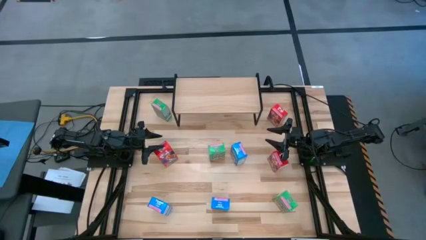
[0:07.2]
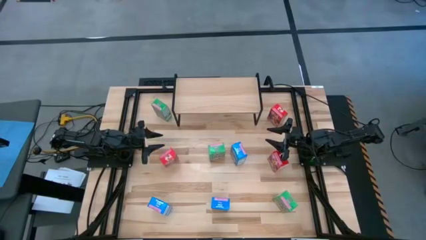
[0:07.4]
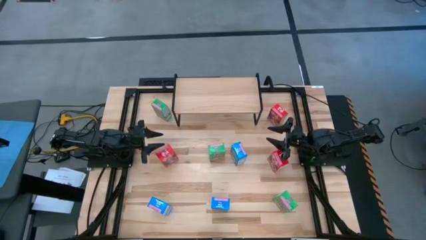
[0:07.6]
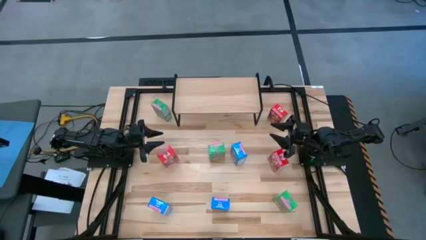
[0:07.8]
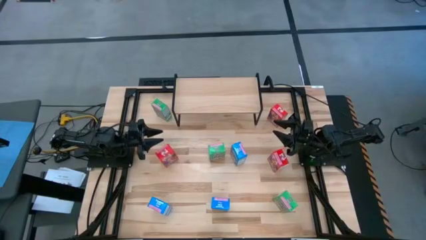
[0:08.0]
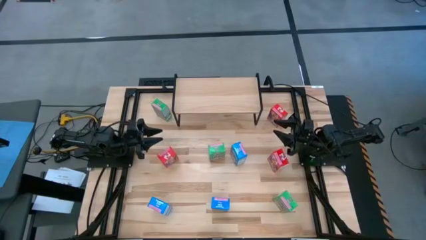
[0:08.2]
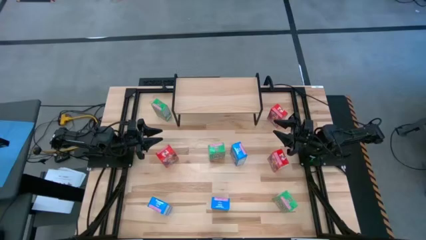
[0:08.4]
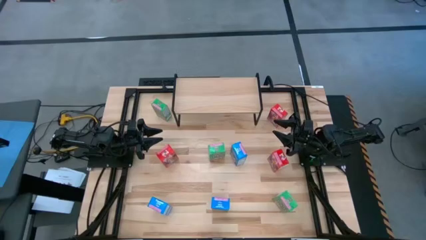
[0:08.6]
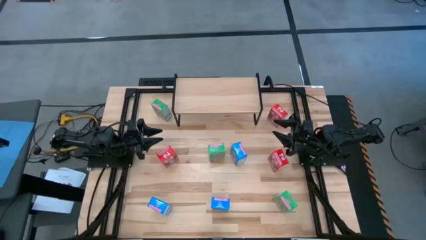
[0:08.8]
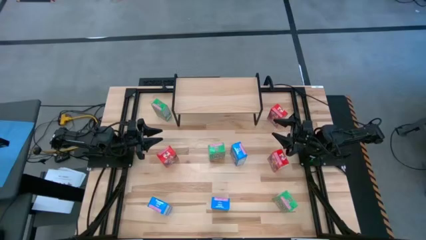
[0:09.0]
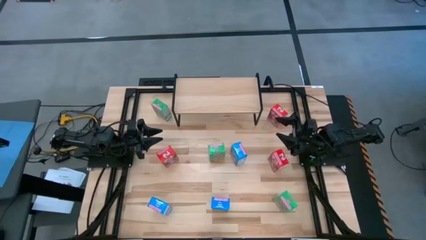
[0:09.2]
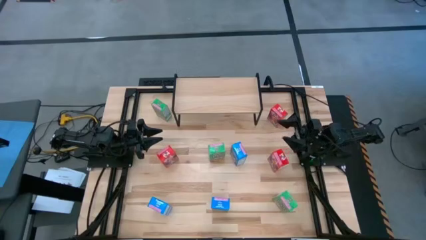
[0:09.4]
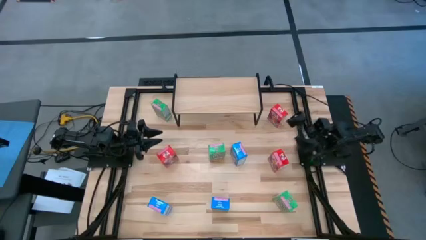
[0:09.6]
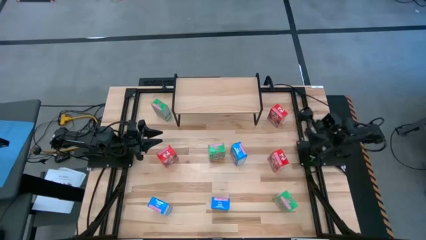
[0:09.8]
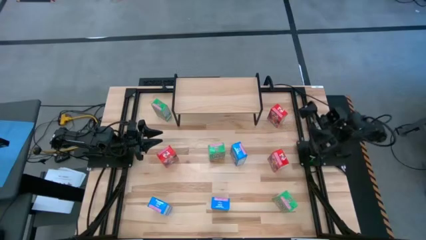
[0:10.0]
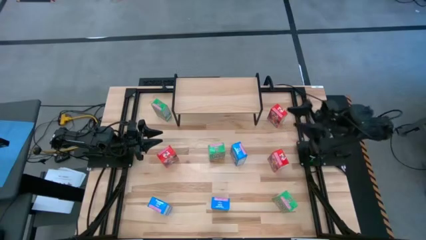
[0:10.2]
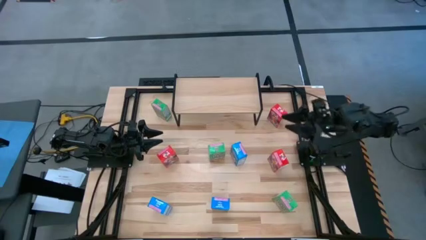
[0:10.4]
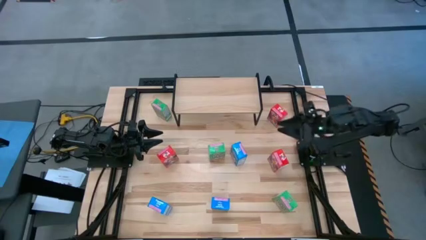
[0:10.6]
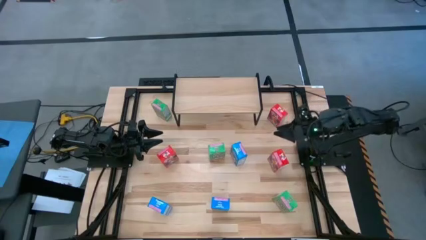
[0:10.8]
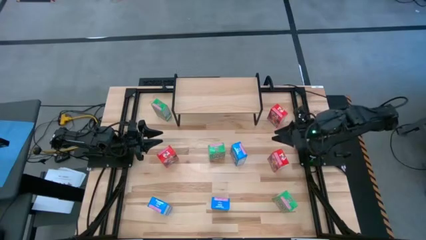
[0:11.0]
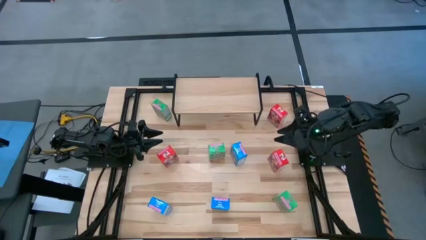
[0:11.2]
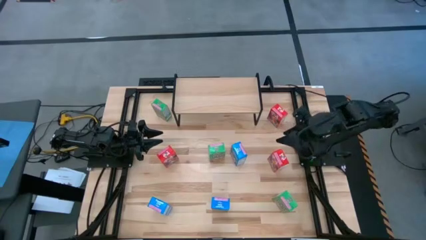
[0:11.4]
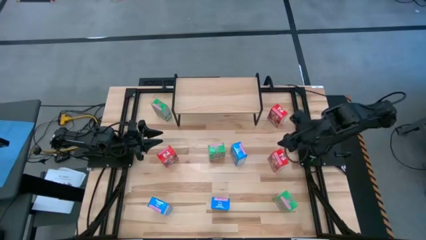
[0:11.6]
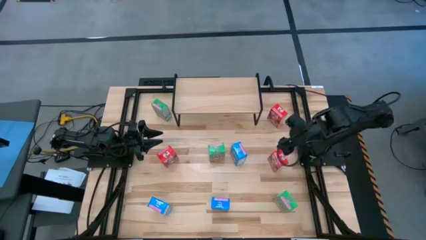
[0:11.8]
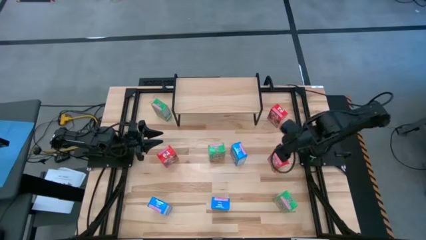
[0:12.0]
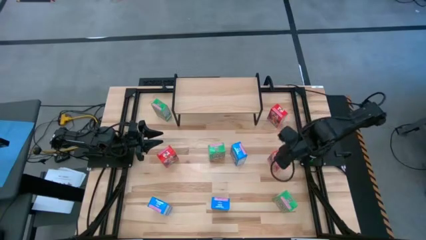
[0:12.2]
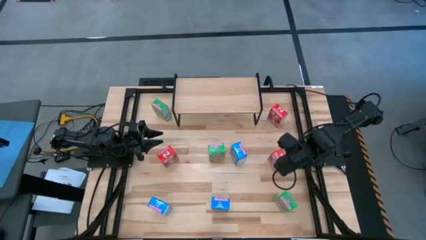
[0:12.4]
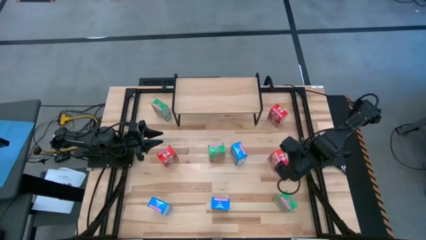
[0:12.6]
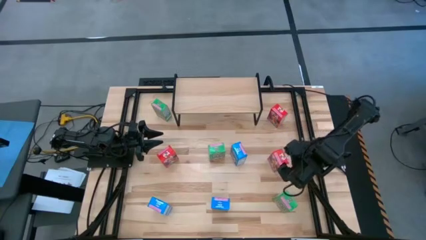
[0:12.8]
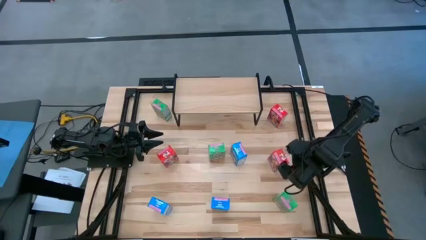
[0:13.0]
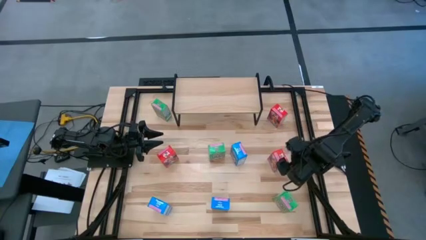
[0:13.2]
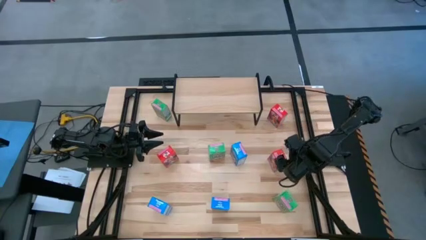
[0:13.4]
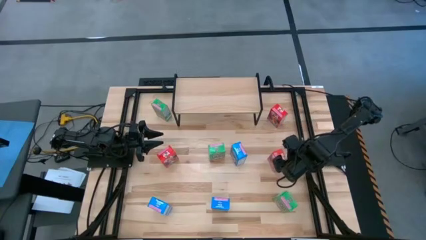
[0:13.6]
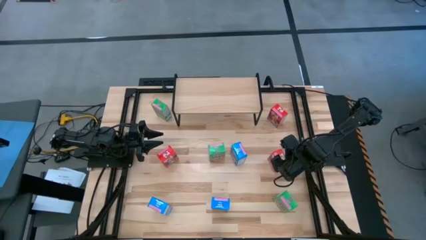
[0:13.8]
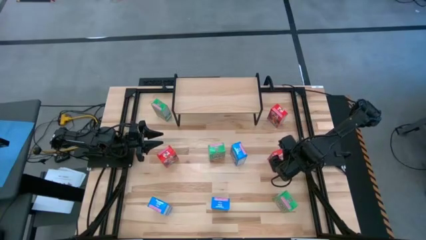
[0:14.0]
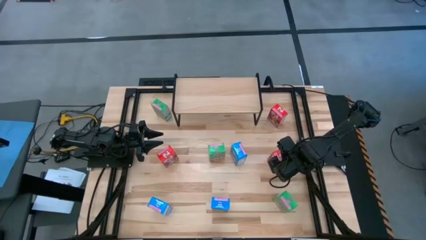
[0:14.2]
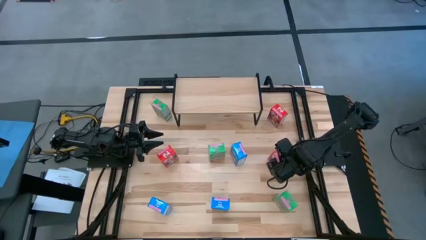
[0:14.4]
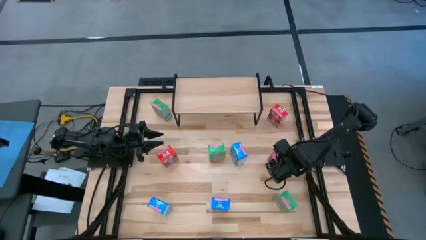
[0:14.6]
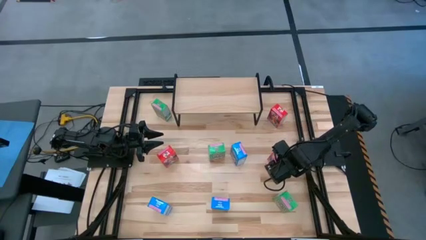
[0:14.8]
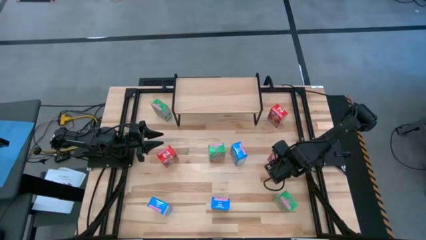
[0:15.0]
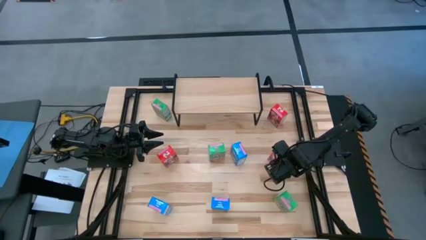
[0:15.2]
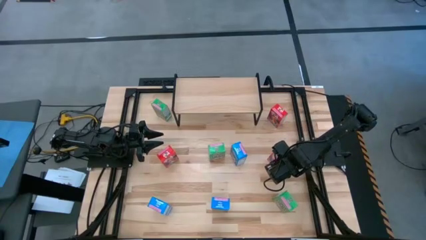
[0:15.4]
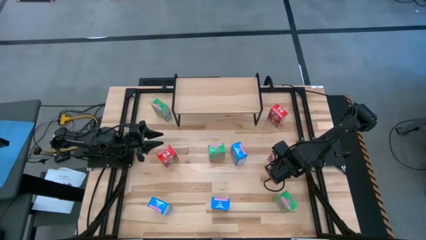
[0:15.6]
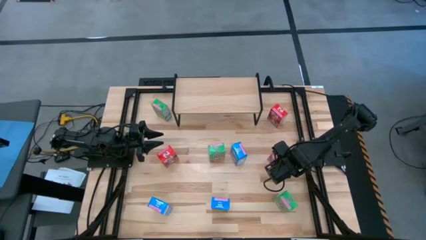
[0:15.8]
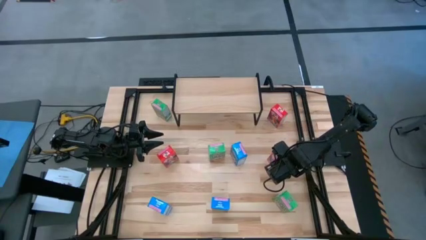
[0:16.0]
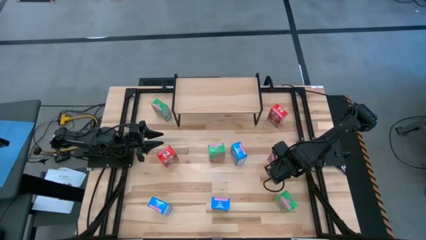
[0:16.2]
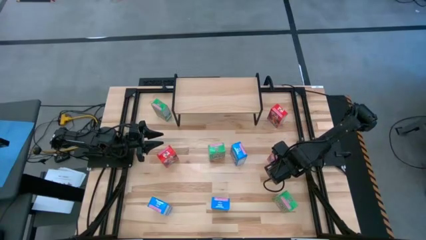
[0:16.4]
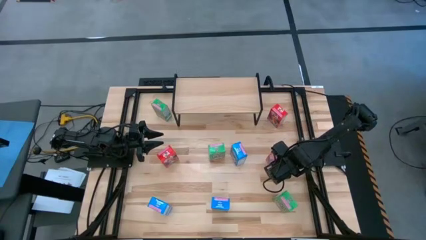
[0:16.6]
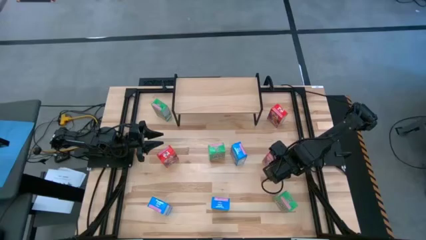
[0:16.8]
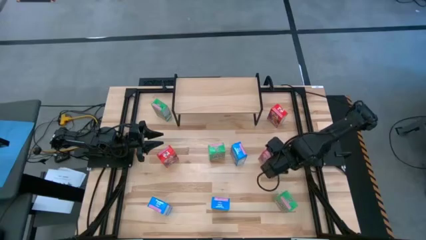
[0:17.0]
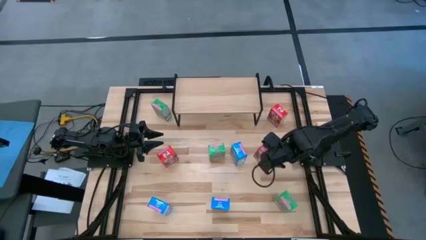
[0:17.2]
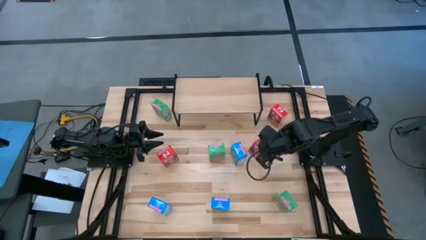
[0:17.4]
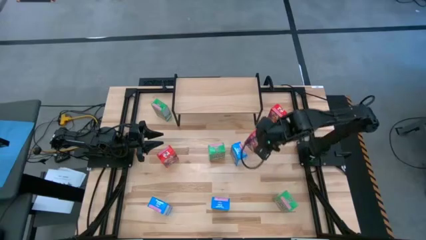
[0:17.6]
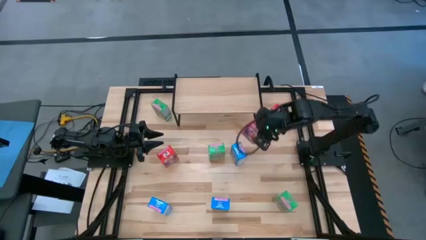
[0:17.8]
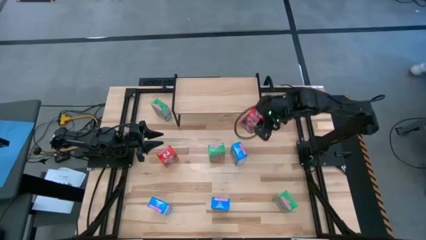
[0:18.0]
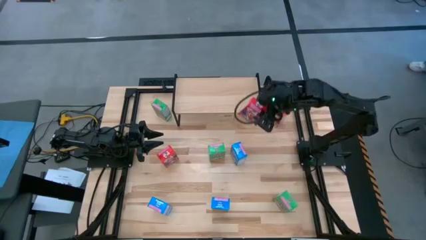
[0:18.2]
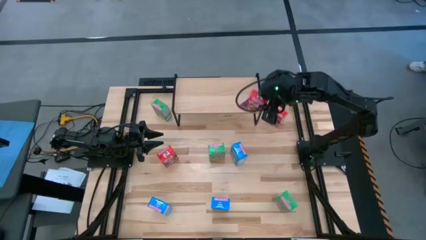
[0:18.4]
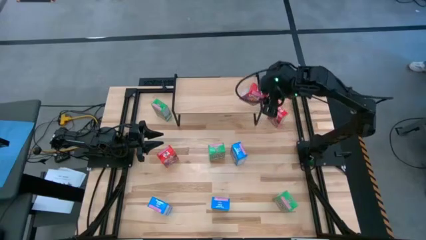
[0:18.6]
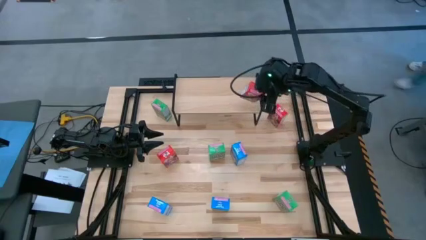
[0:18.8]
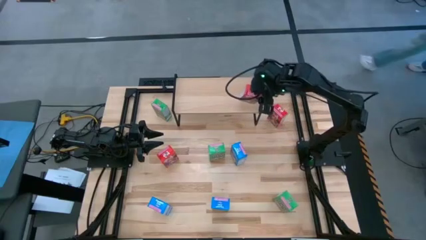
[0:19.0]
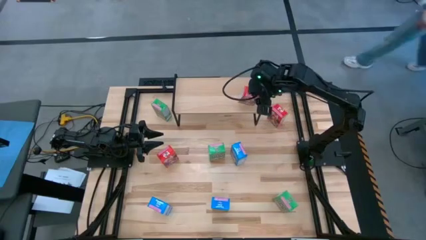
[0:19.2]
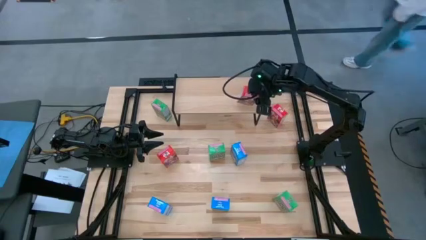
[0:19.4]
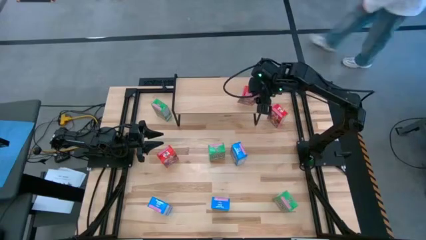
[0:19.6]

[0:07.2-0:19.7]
Task: Stack cereal on shelf
Put the bottom right red cereal box on the shelf

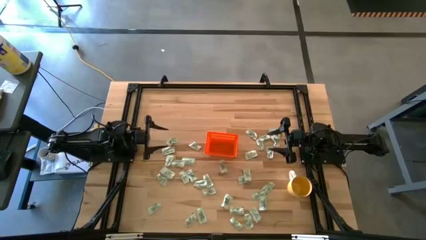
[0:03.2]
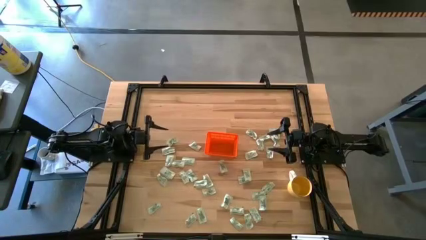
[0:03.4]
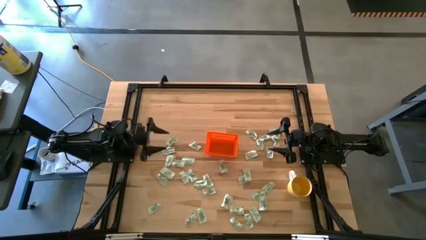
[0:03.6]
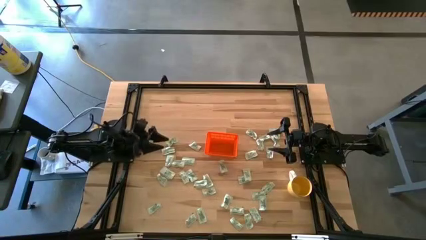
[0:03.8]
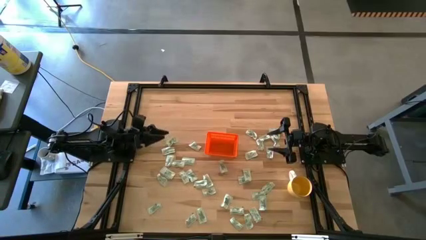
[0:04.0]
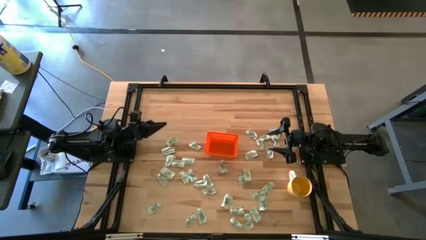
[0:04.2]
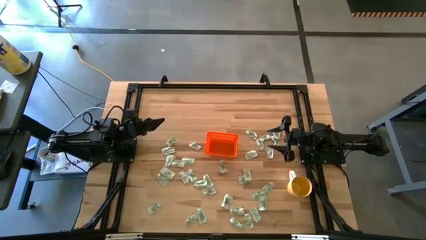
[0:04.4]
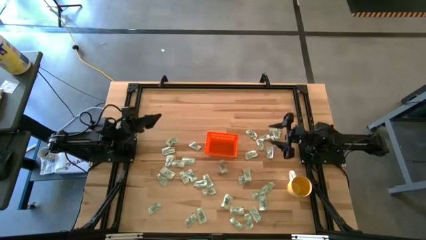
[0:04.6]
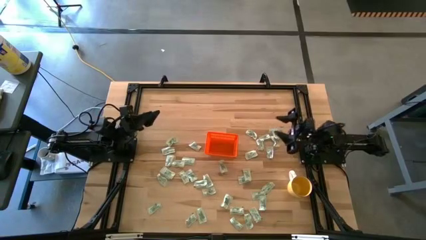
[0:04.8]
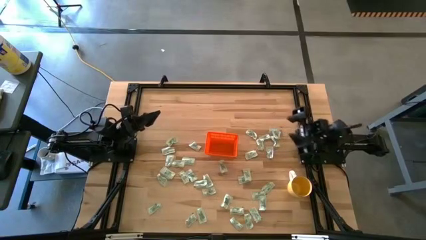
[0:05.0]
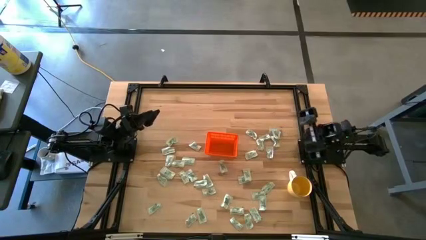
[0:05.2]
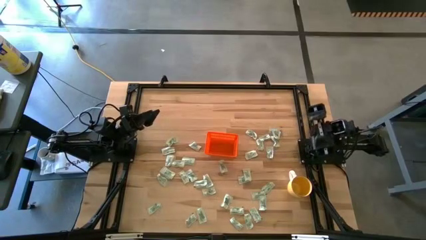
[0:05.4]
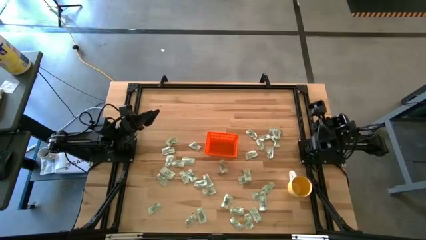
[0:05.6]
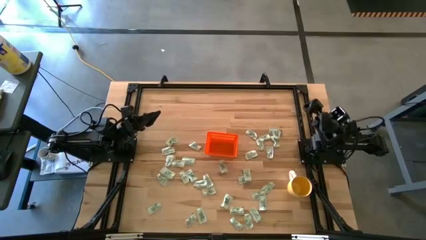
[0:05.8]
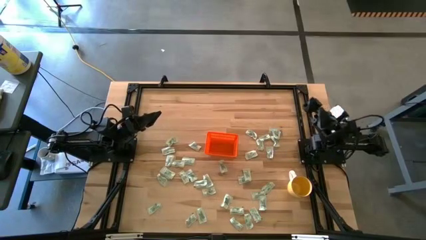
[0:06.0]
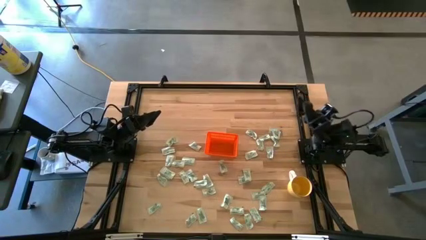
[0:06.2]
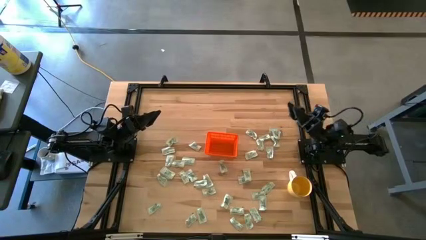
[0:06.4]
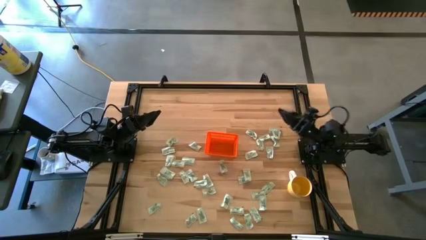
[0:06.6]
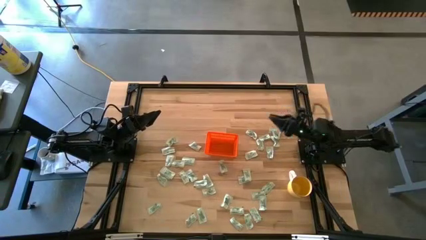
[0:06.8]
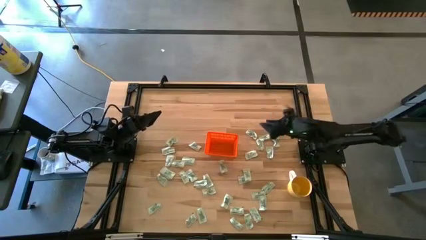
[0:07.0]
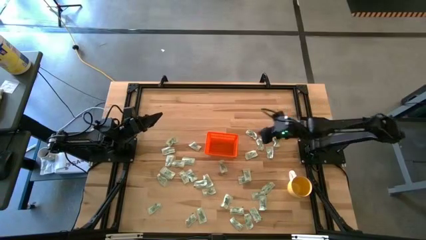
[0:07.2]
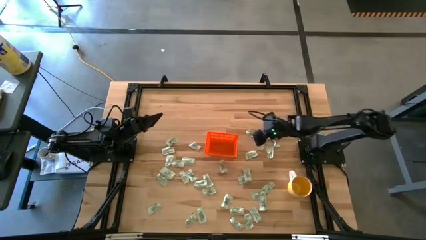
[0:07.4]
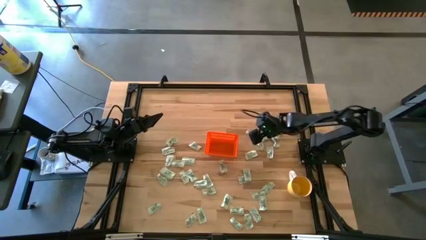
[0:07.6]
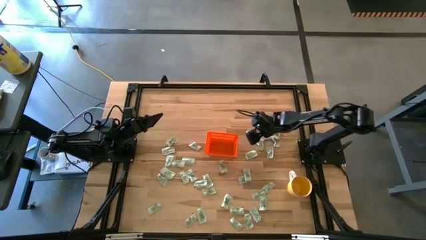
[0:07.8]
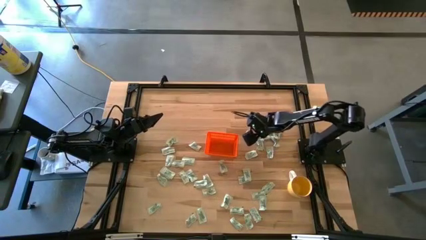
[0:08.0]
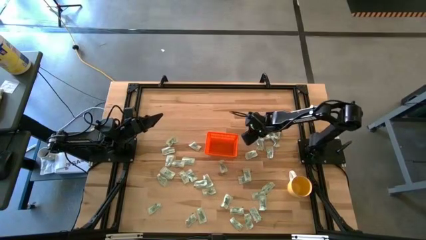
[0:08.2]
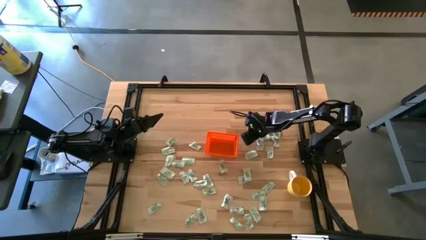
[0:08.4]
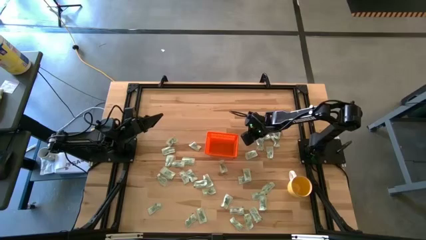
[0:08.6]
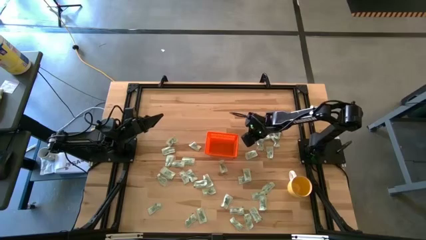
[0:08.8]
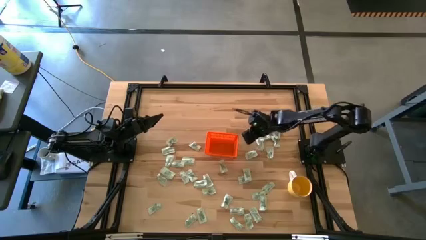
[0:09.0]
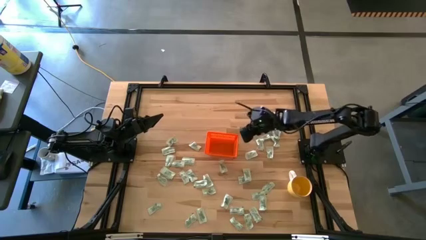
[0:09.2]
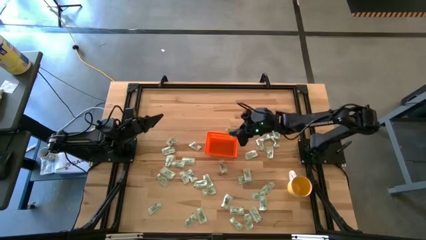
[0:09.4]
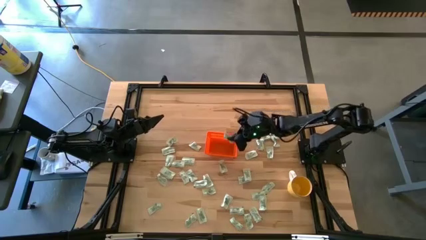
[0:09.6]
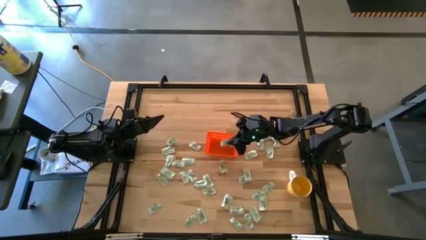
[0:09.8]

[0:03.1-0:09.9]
Task: Pick and place Stevia / Truvia into bins
Put the light green stevia packet into the orange bin
